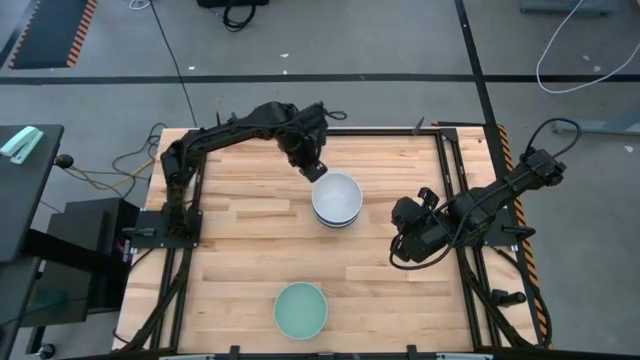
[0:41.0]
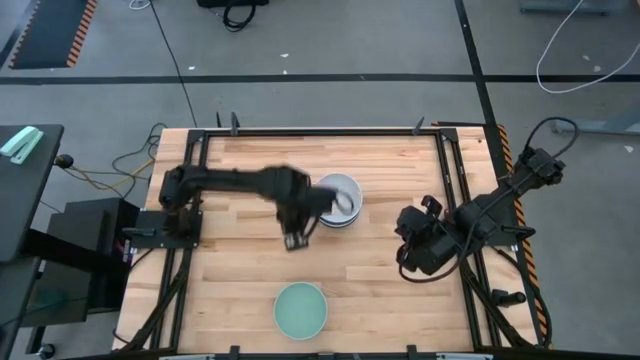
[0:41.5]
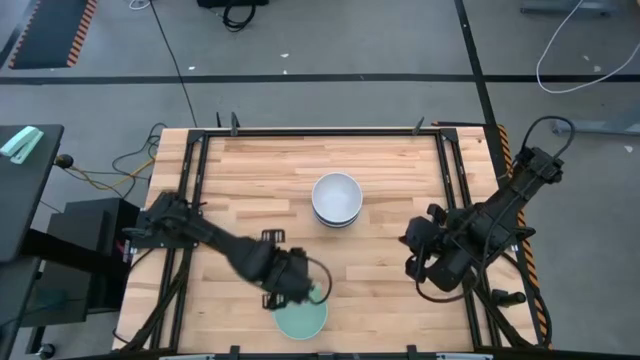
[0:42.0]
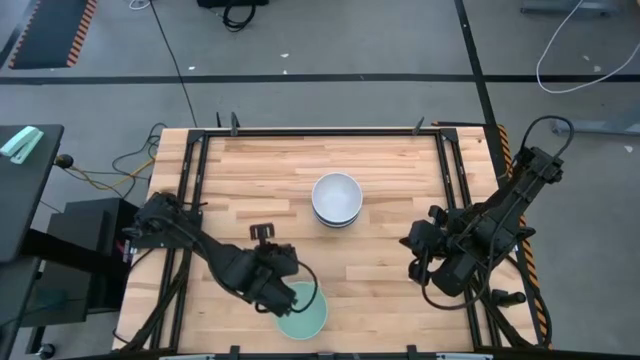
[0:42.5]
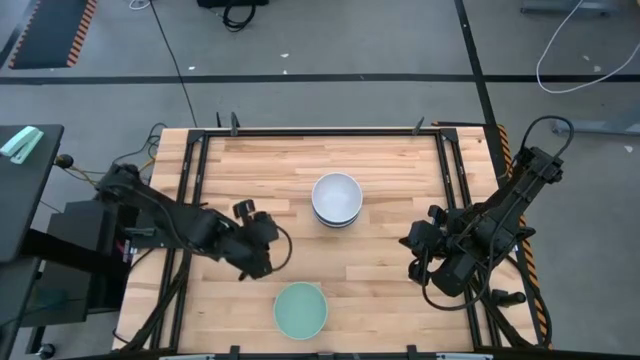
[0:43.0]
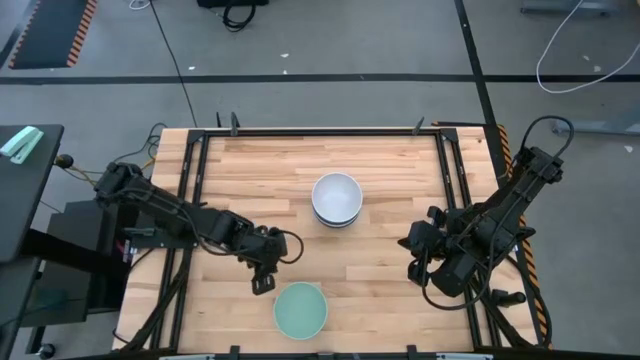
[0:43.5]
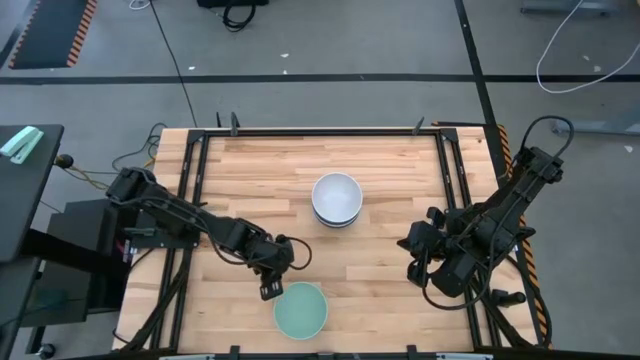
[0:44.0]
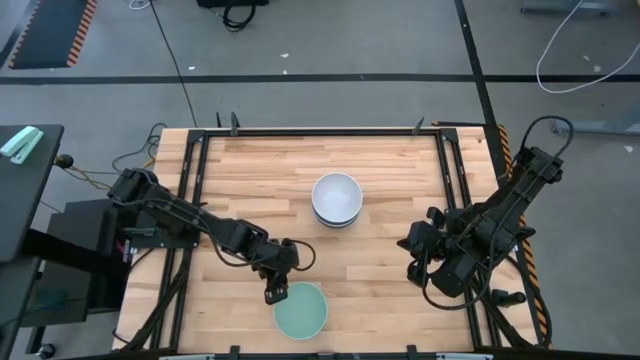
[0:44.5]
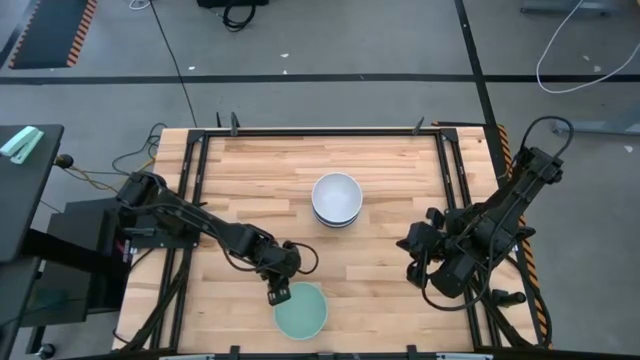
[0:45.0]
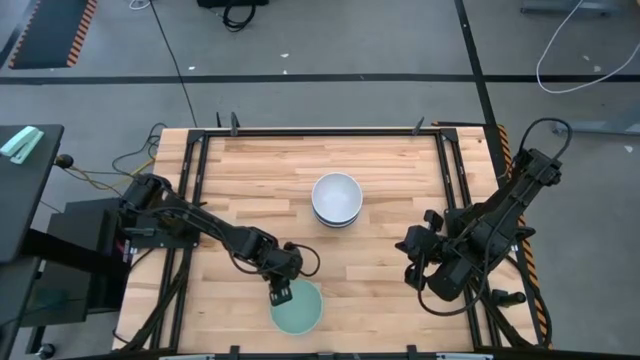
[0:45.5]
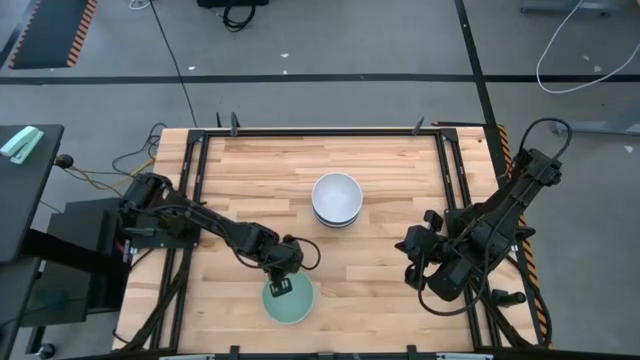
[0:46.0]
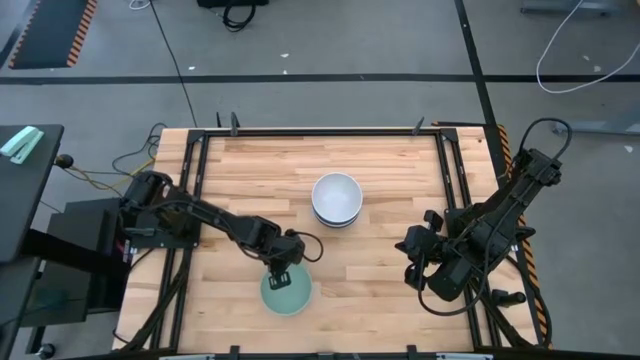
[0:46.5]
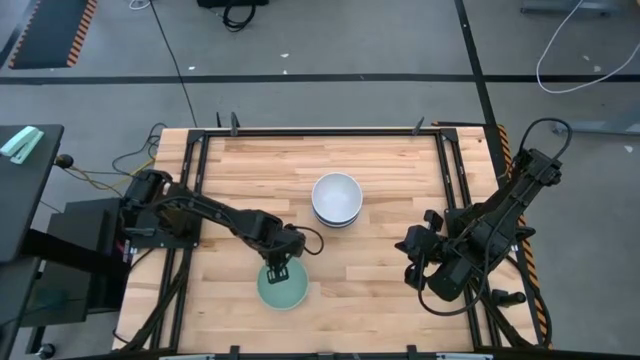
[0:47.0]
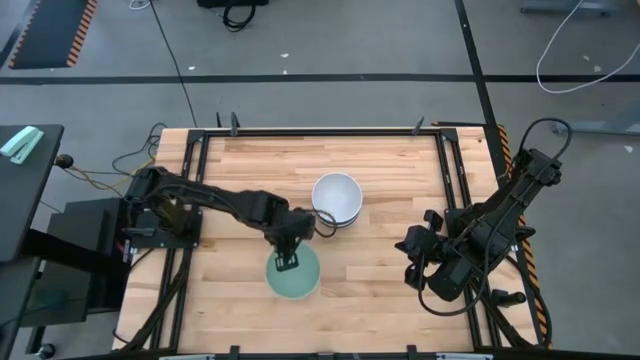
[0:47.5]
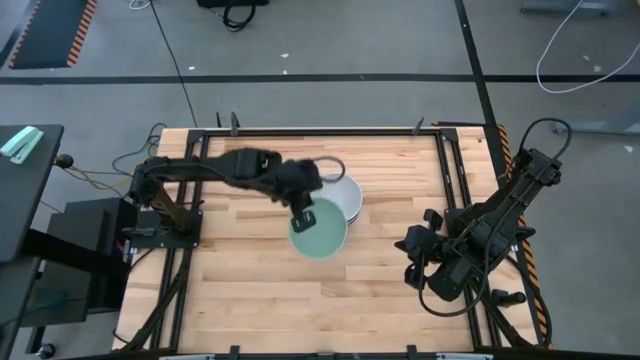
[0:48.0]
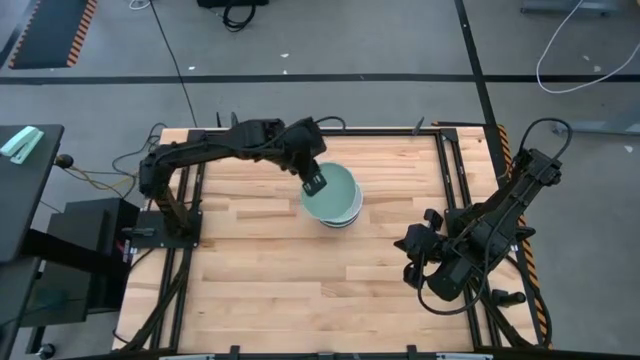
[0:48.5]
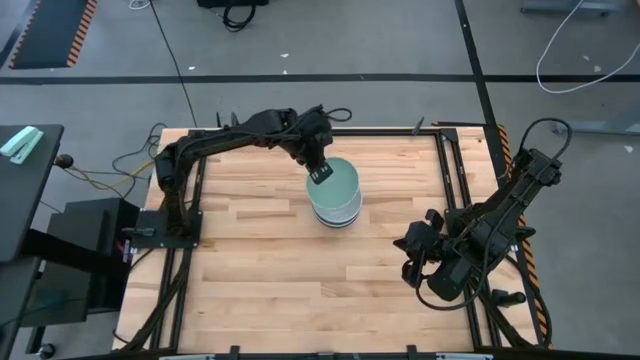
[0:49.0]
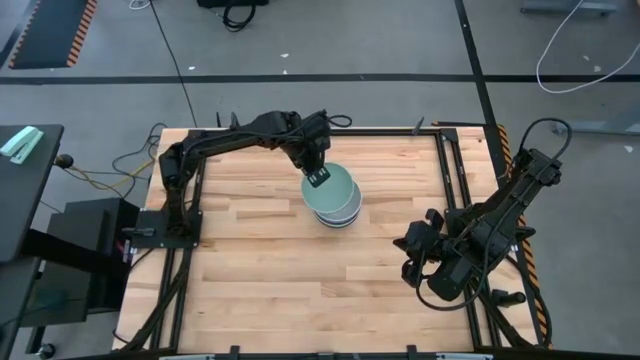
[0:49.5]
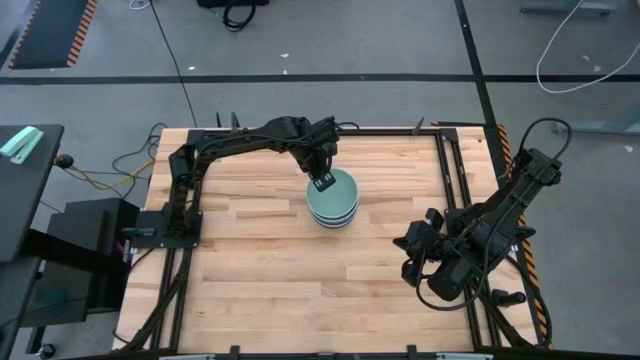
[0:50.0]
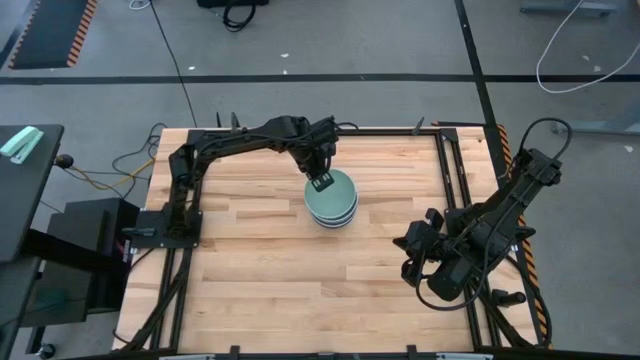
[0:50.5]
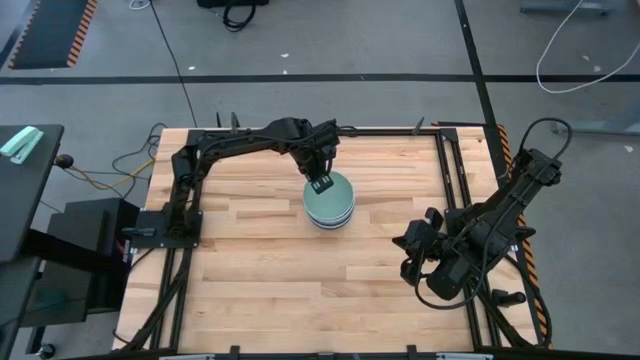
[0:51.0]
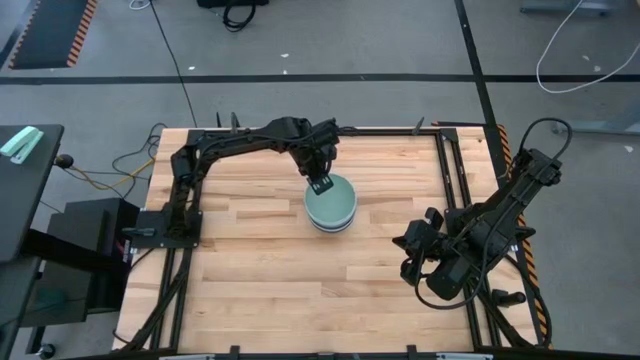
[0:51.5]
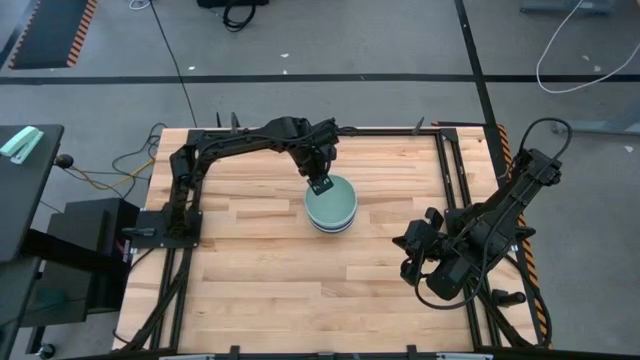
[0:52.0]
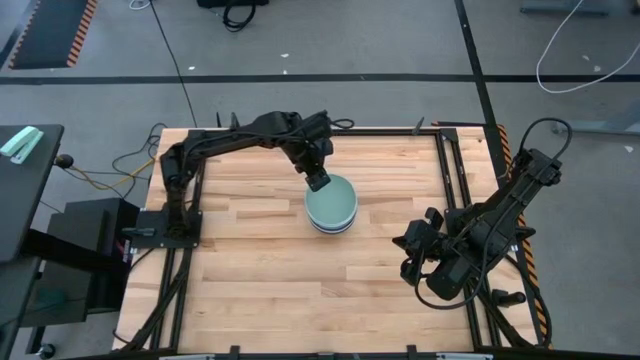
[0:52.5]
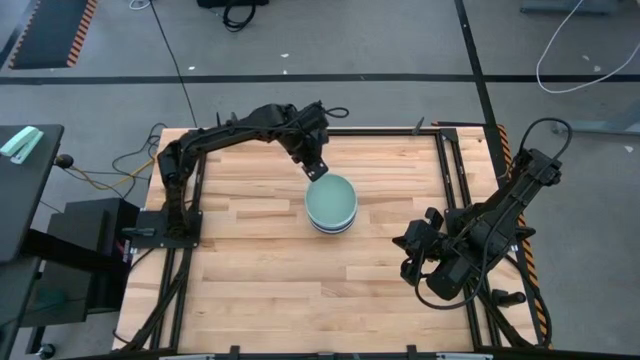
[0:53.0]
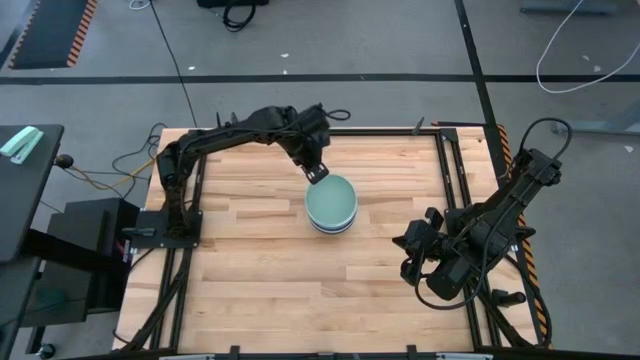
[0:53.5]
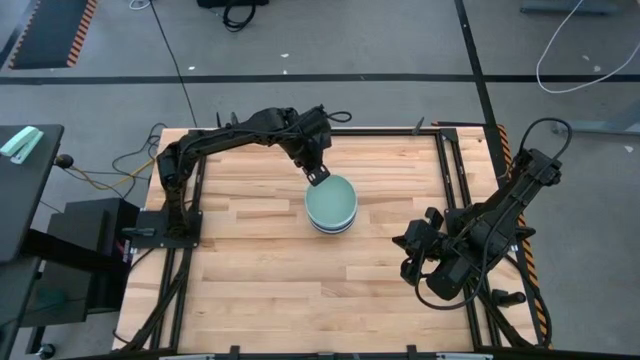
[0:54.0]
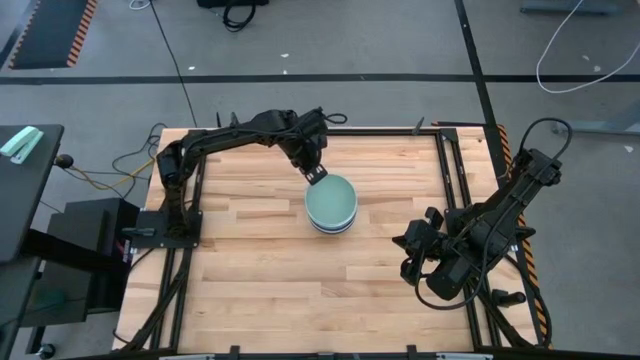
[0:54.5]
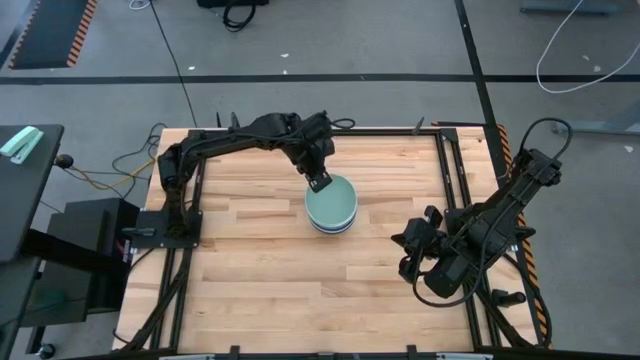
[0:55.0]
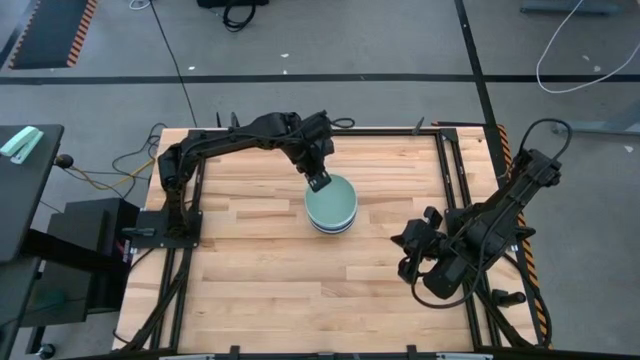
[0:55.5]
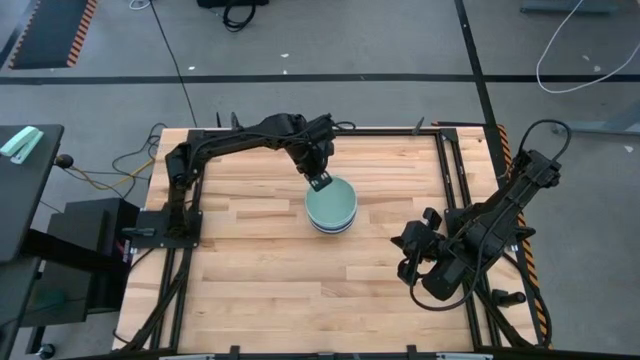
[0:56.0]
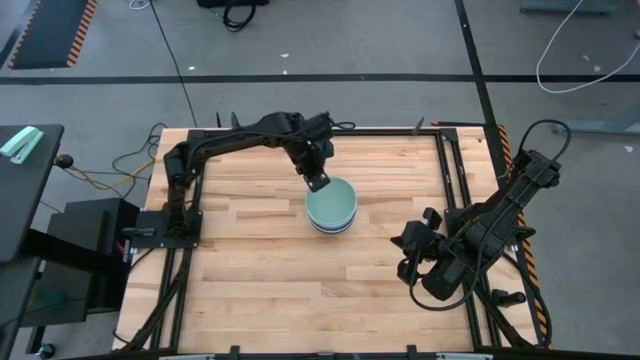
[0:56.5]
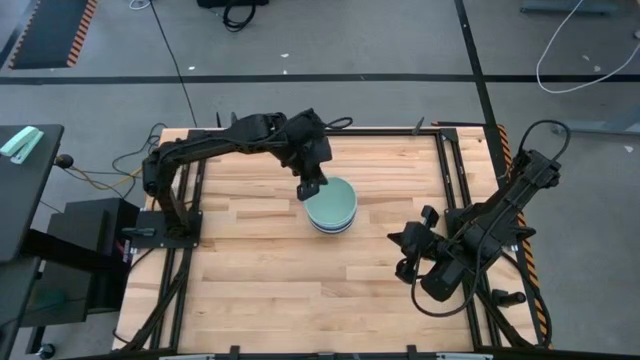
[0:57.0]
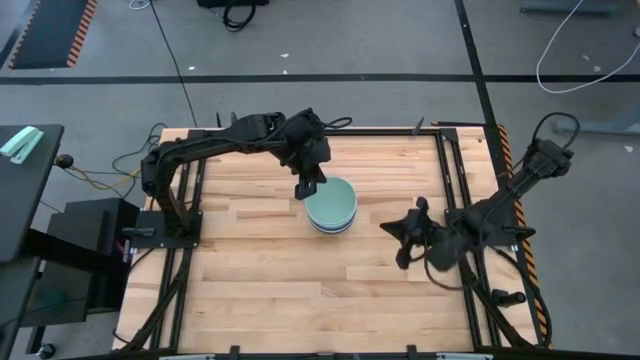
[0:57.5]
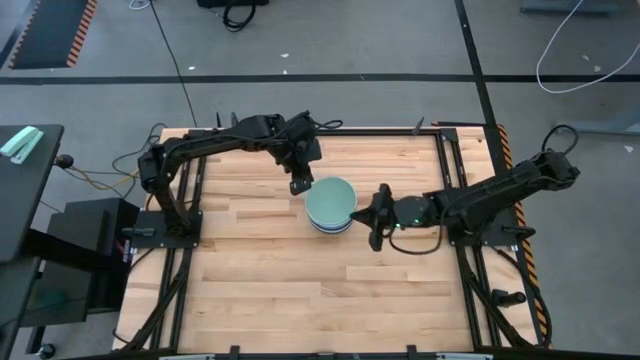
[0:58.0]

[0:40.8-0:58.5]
Task: Nest bowls inside each other
Stack the green bowl on the white bowl

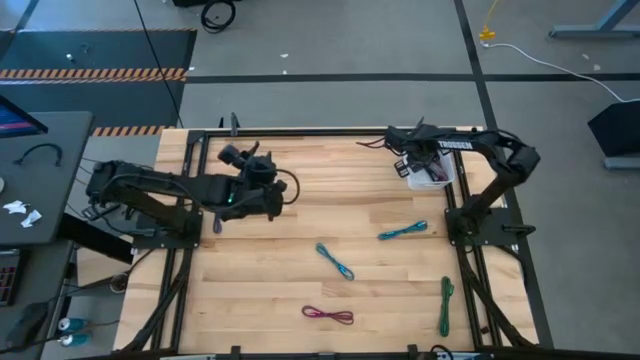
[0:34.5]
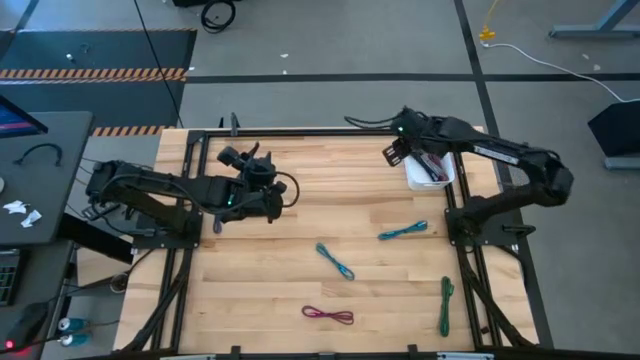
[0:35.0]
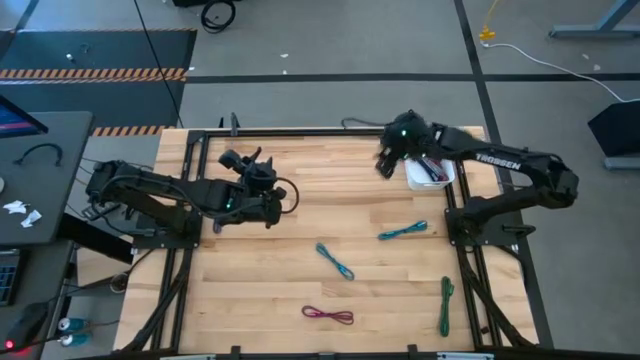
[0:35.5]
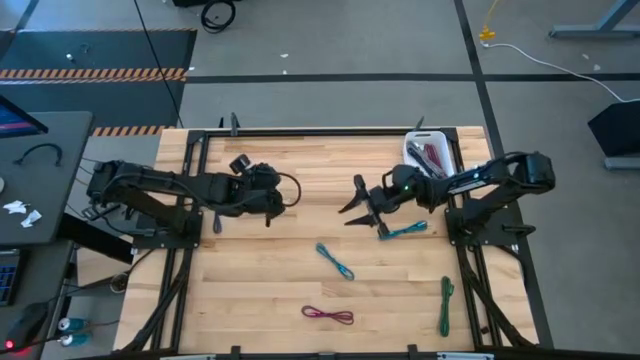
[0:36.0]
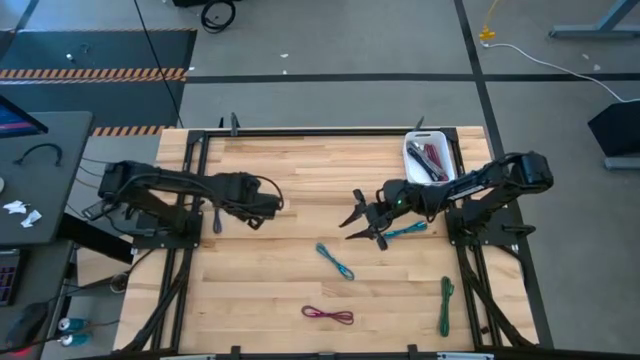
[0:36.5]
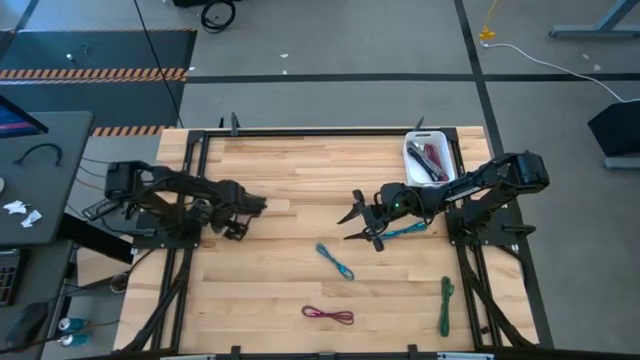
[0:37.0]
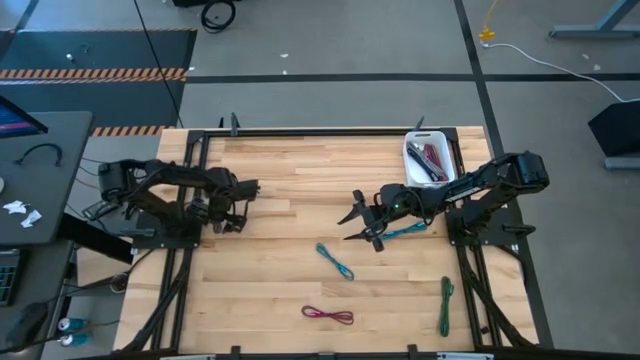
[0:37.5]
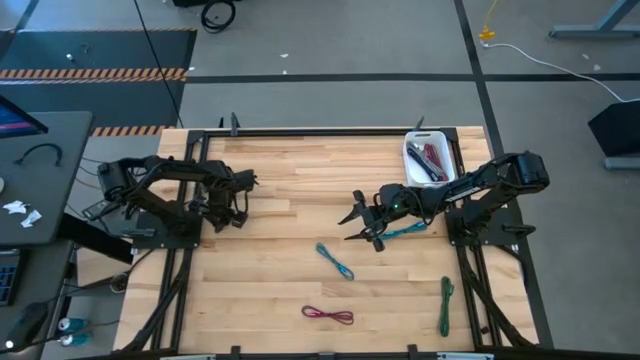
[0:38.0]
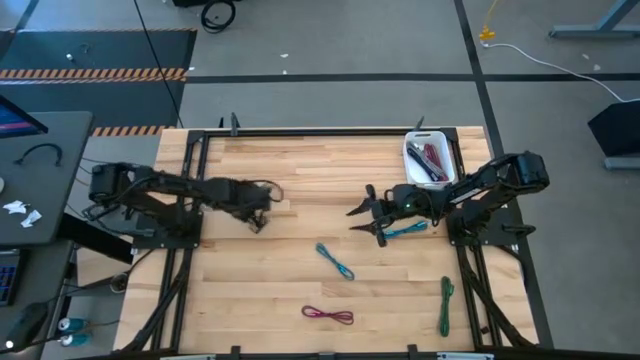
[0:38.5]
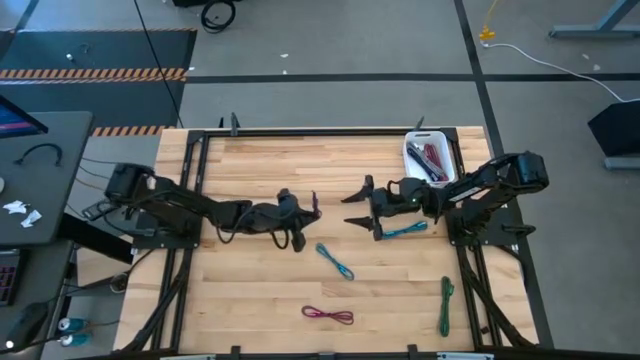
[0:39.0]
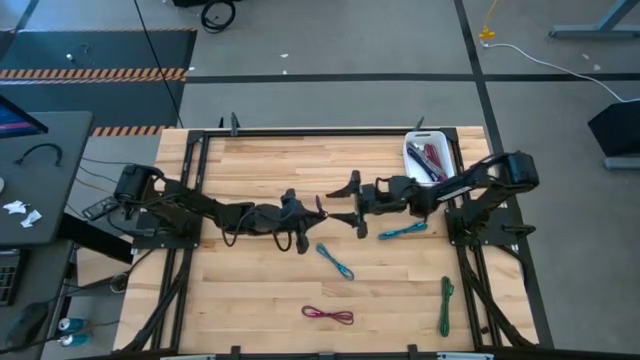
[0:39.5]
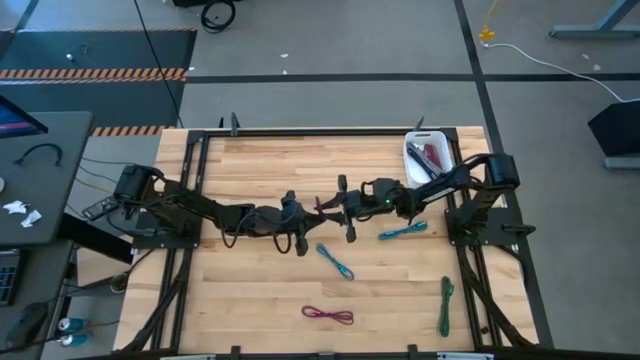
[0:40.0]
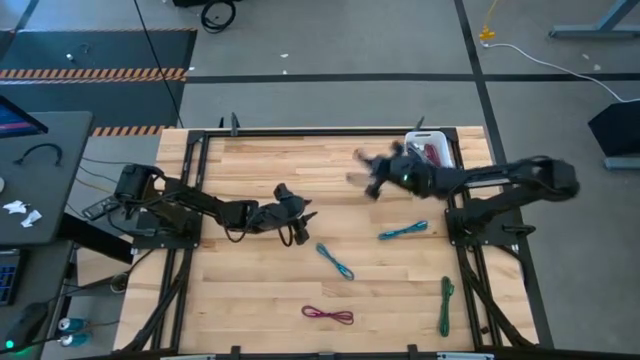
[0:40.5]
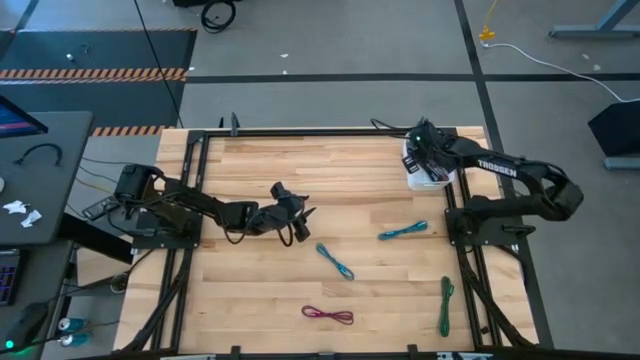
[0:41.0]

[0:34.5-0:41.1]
Task: Pick and place USB-C Cables
Put the black violet charger cable into the bin
